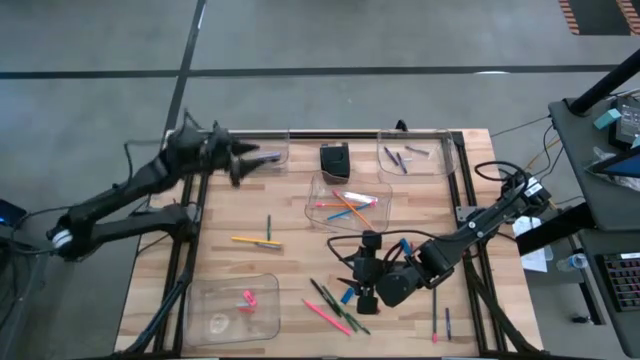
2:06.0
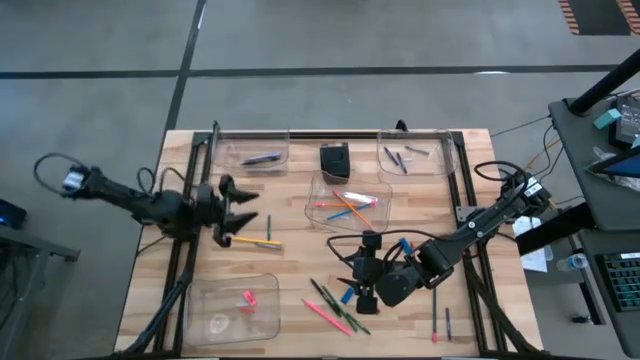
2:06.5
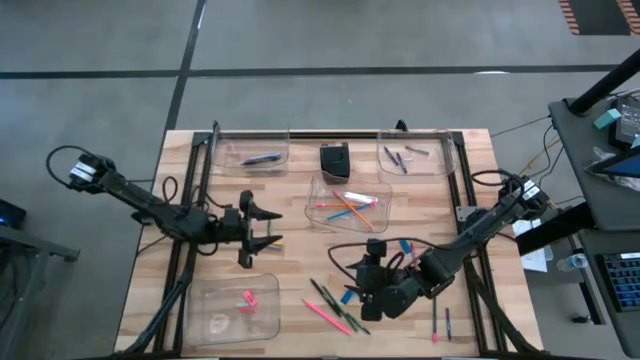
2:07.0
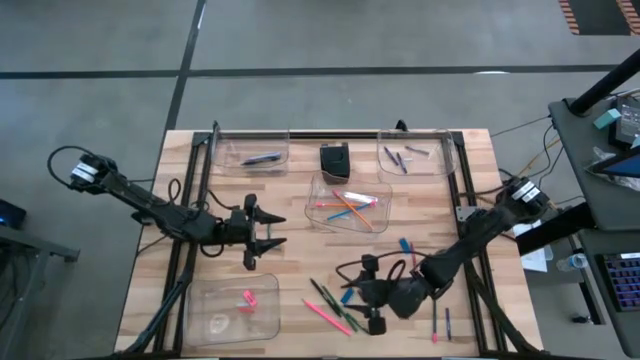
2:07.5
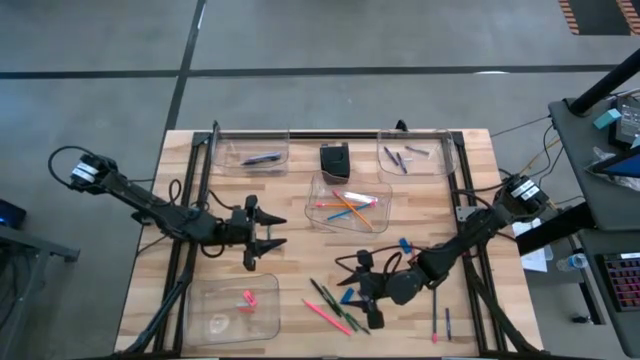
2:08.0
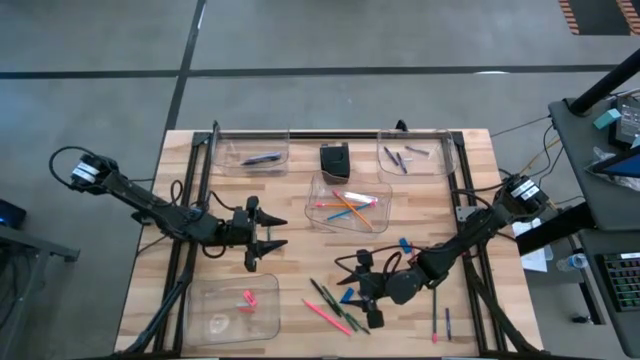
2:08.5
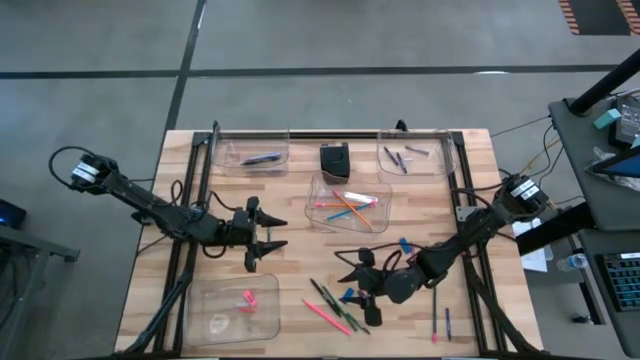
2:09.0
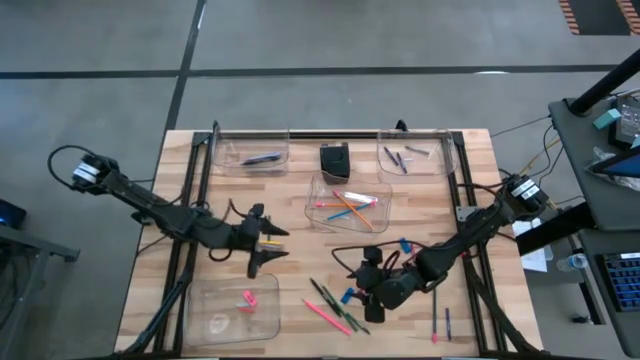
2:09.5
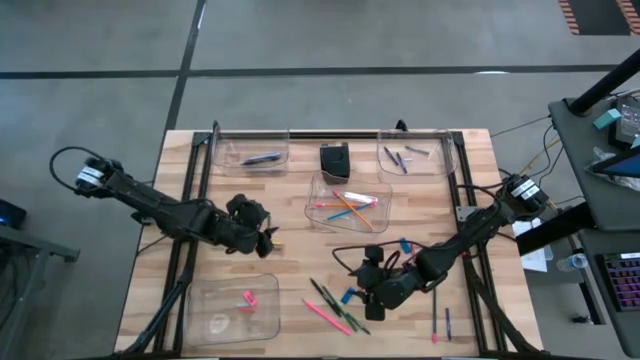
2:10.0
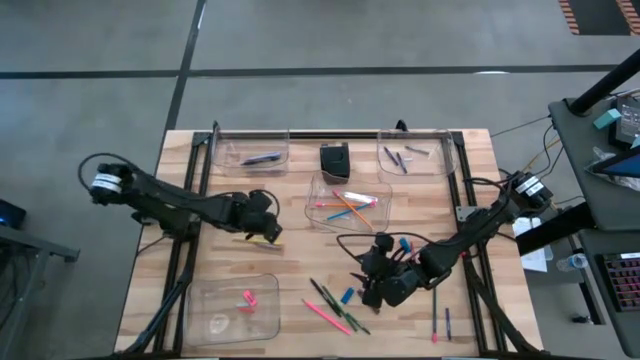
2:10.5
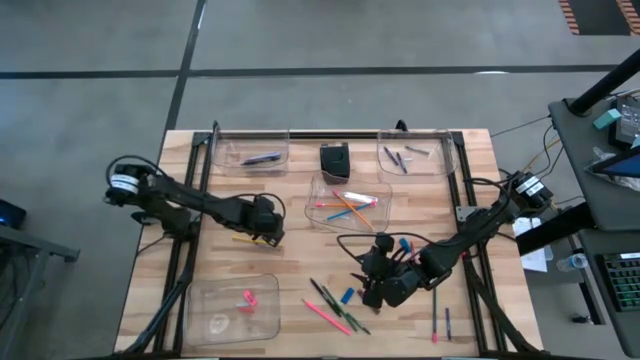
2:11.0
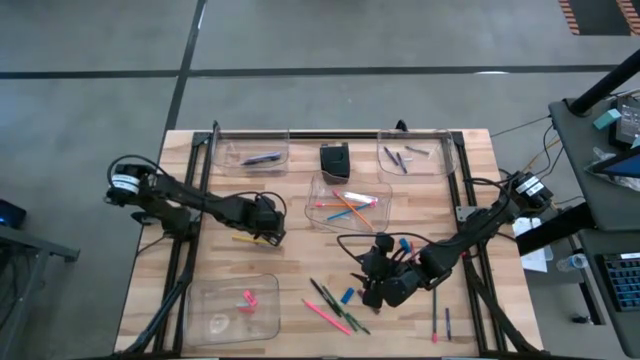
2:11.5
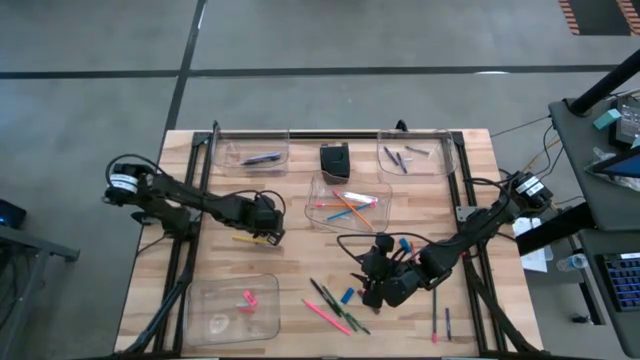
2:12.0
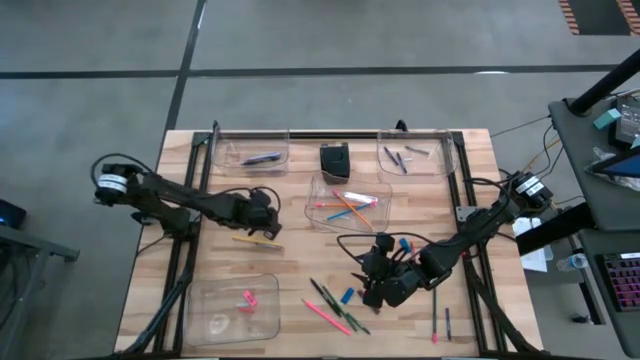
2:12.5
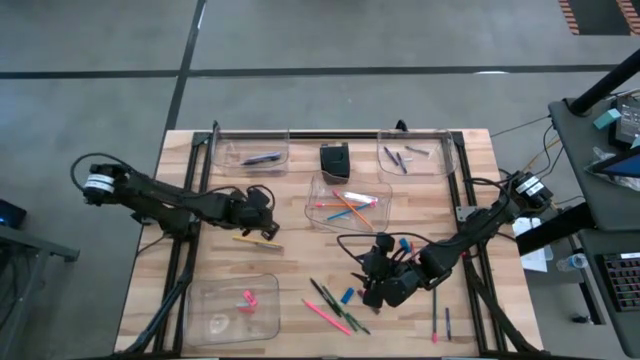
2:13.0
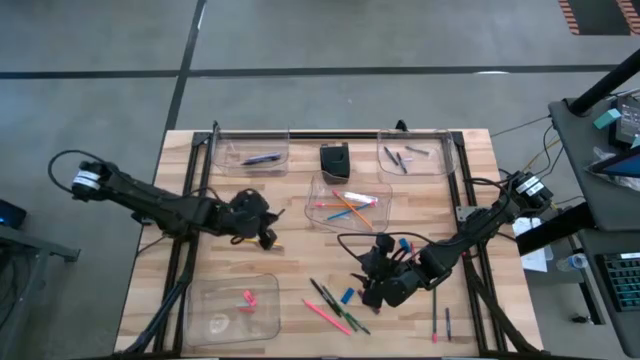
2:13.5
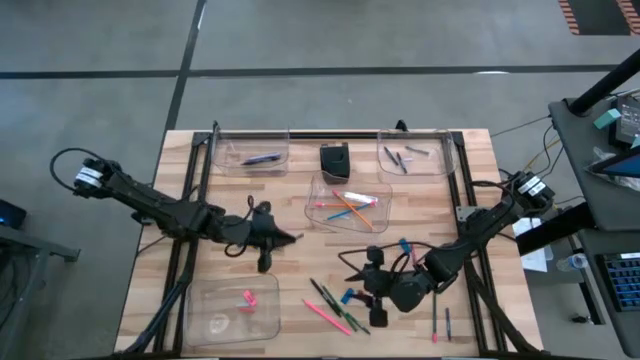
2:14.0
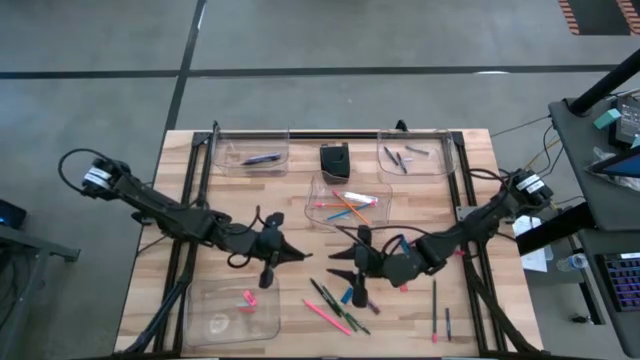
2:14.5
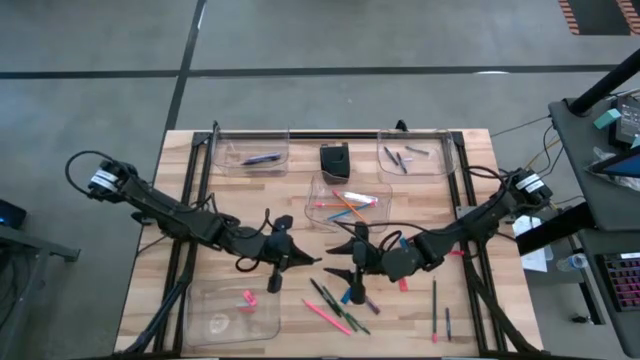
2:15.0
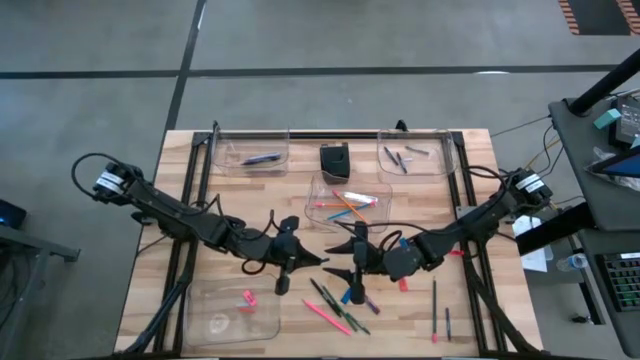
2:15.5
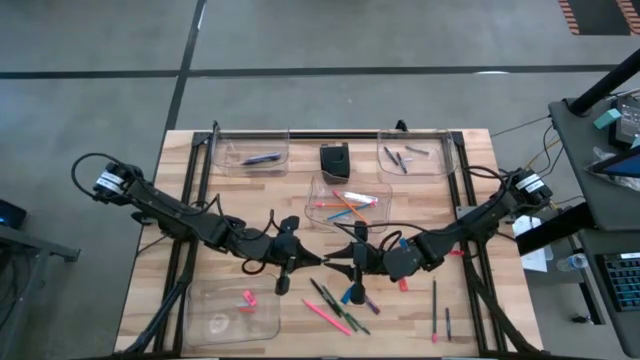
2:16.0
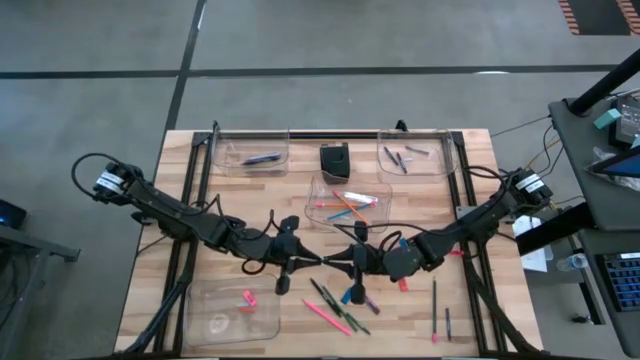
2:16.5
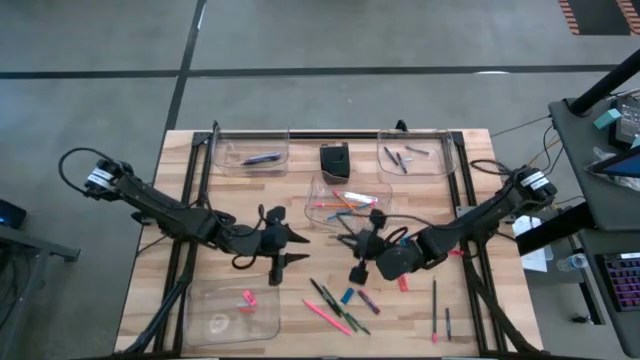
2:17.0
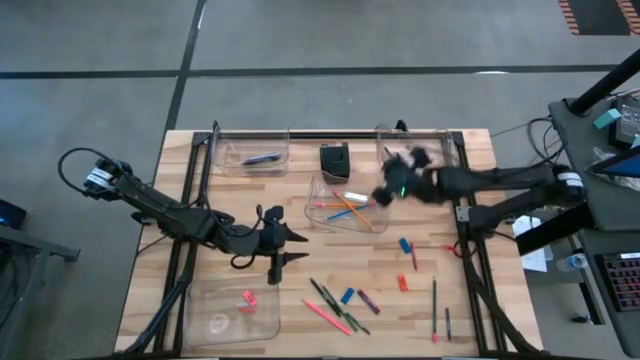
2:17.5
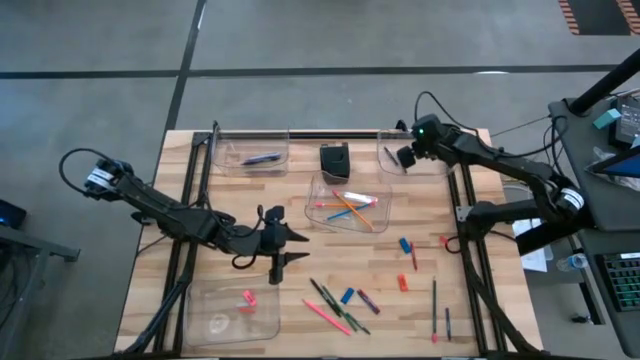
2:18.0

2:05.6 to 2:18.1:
Task: Sort crayons/erasers/pens/pencils in bins
Put the green crayon into the top right transparent bin

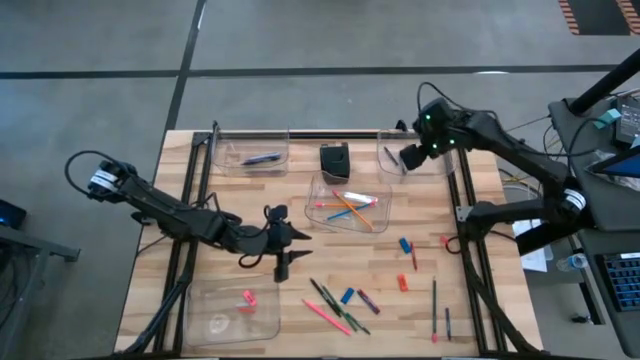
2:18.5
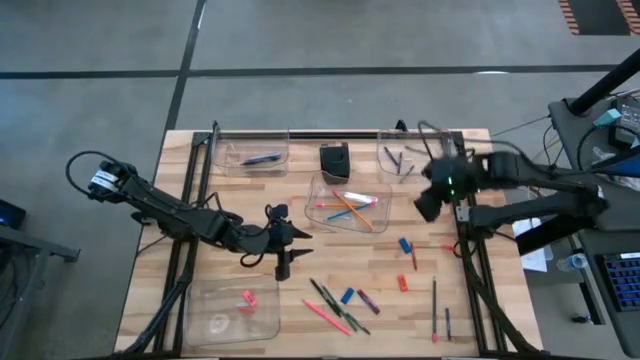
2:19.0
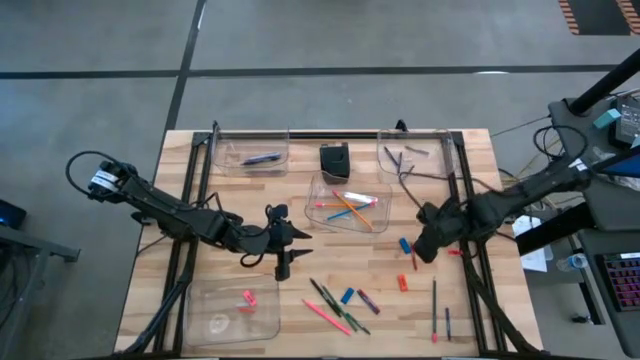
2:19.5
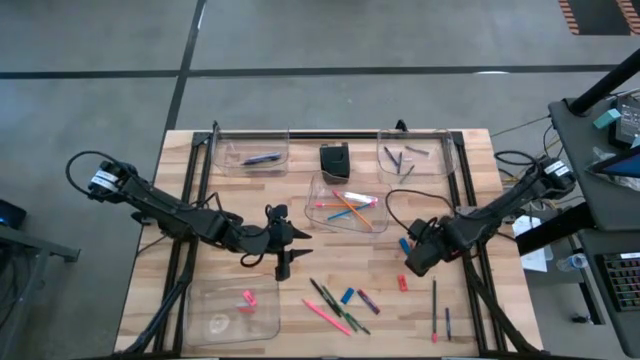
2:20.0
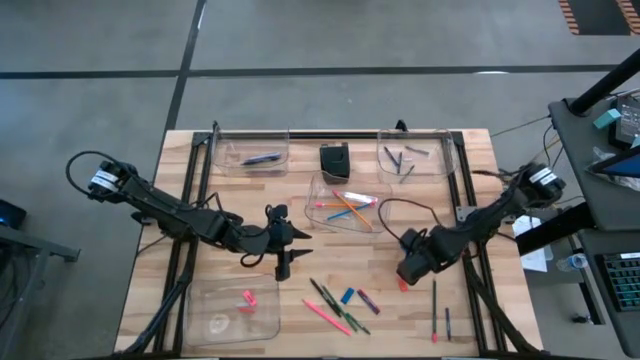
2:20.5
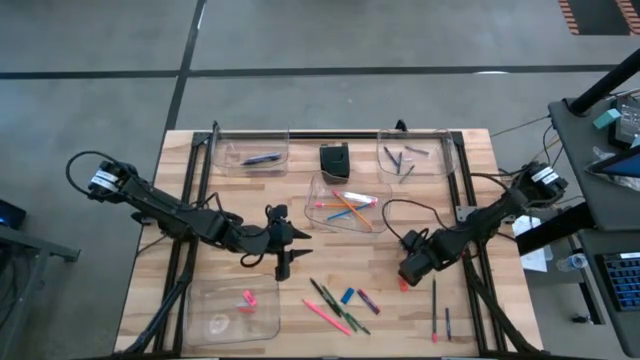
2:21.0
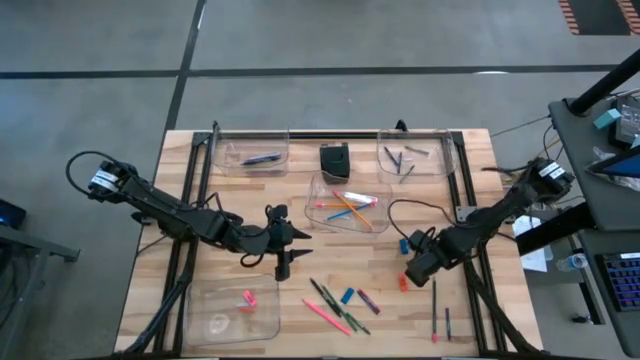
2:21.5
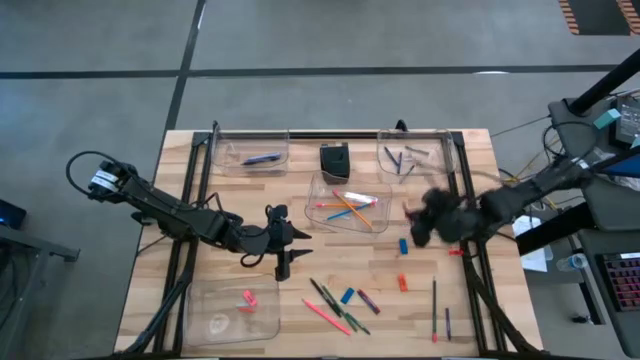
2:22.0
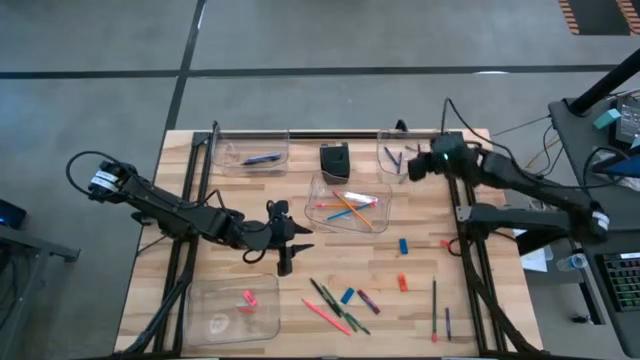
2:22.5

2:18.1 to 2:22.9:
Put the red crayon into the top right transparent bin

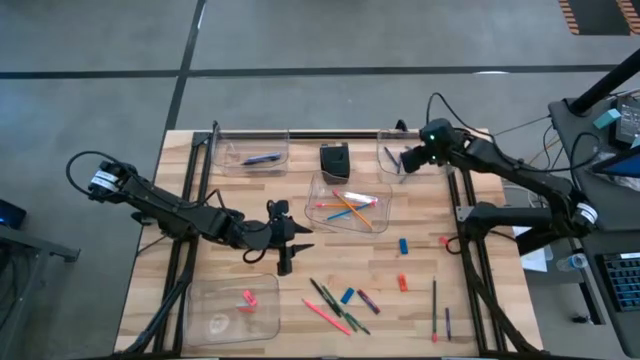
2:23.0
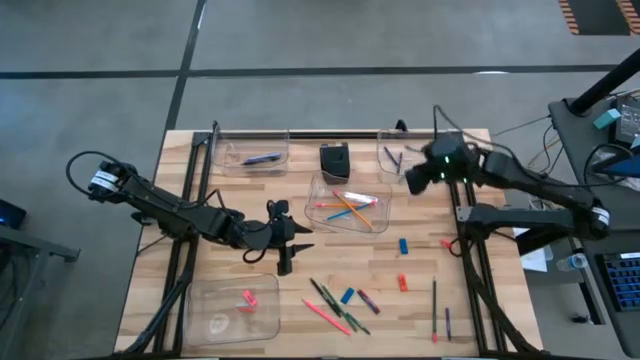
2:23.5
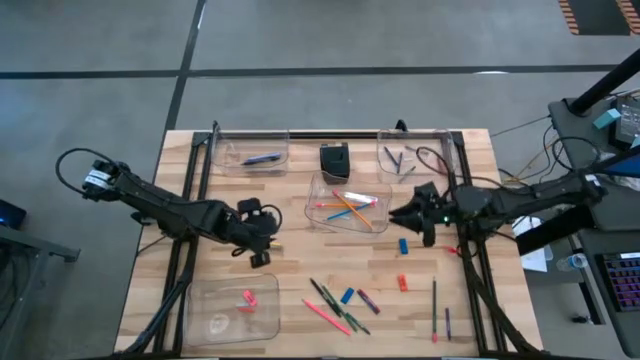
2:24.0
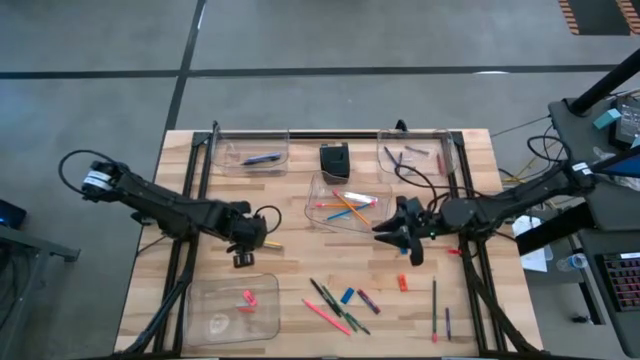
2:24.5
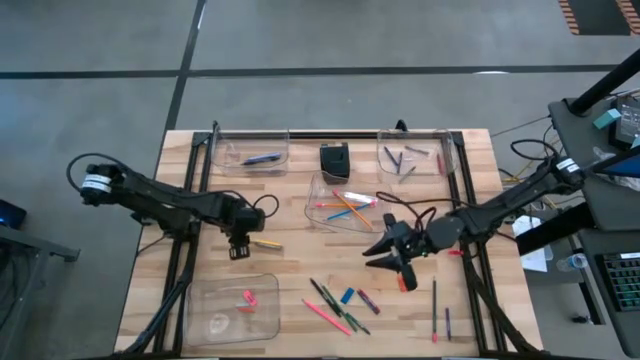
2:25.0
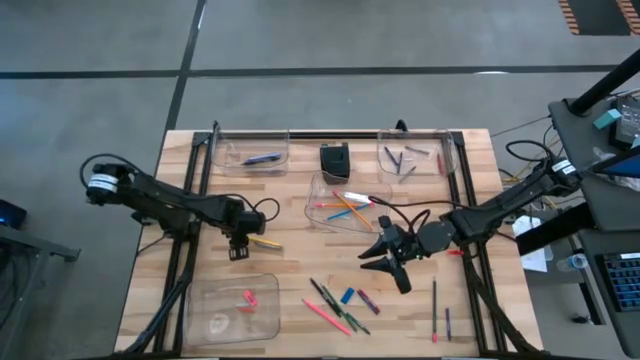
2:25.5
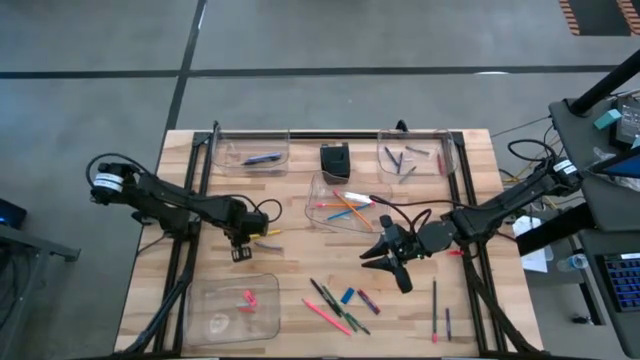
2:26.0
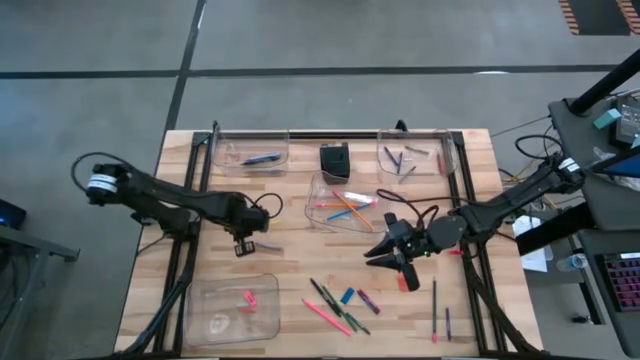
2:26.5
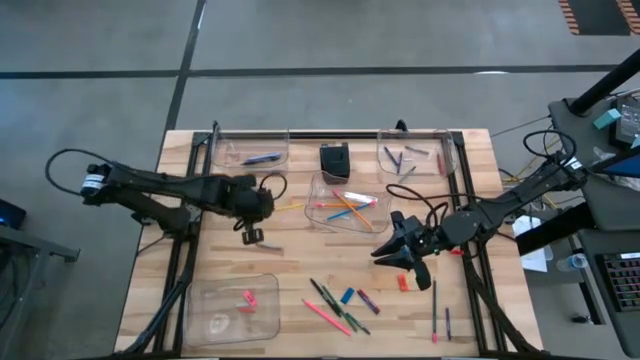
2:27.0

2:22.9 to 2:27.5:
Put the yellow pencil into the middle transparent bin
